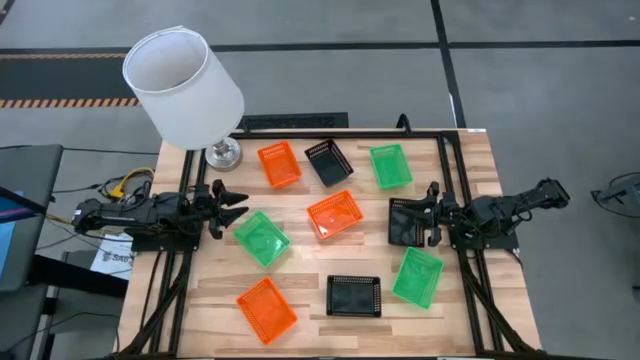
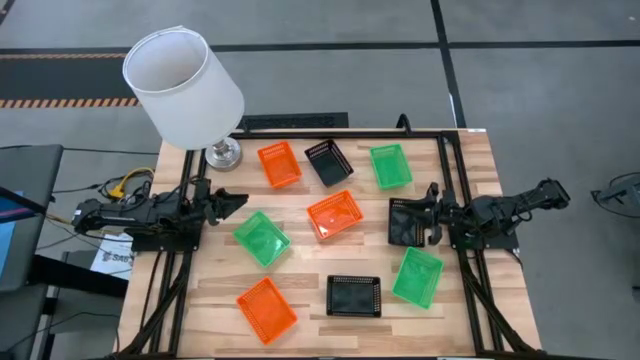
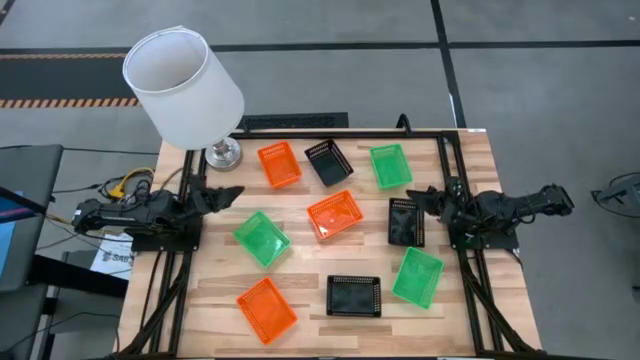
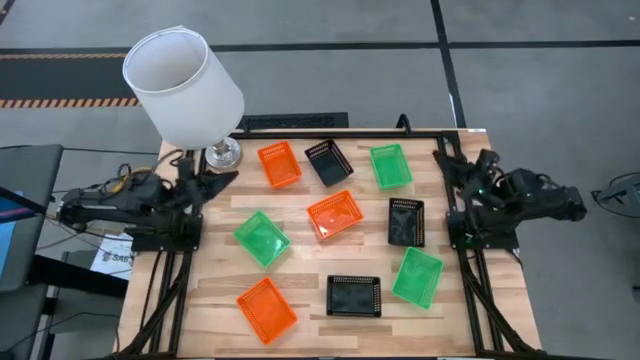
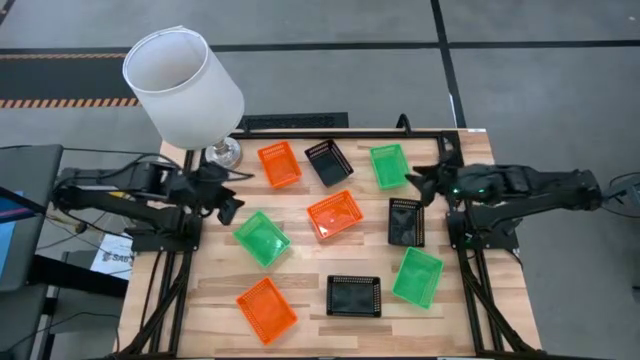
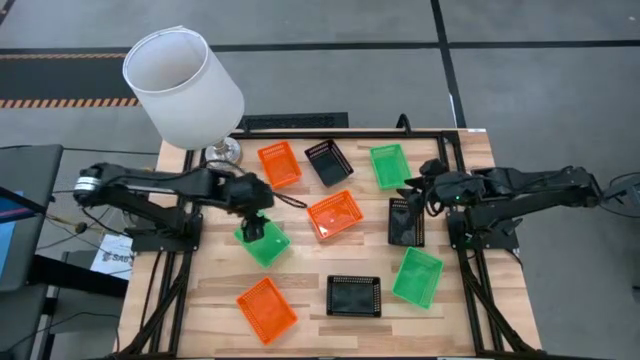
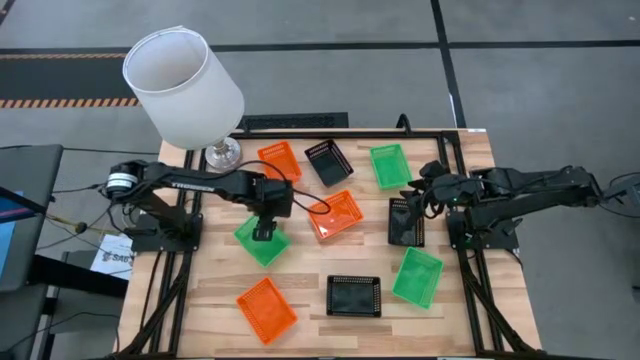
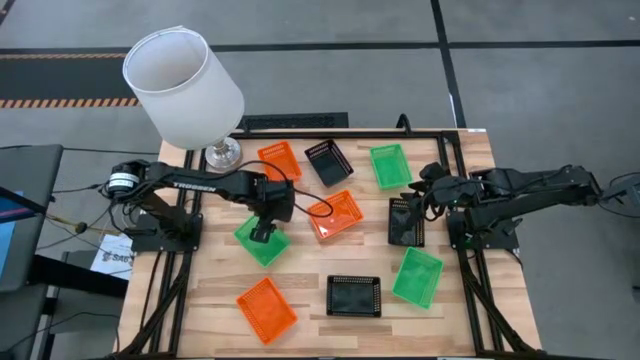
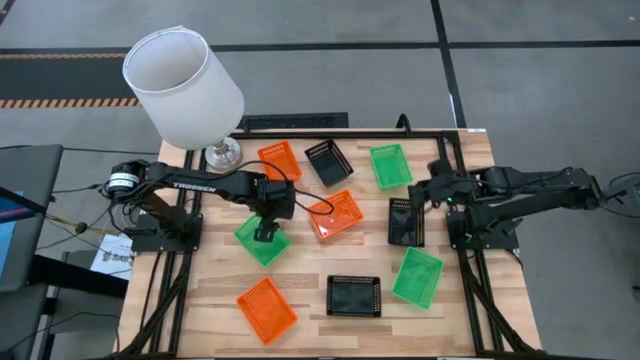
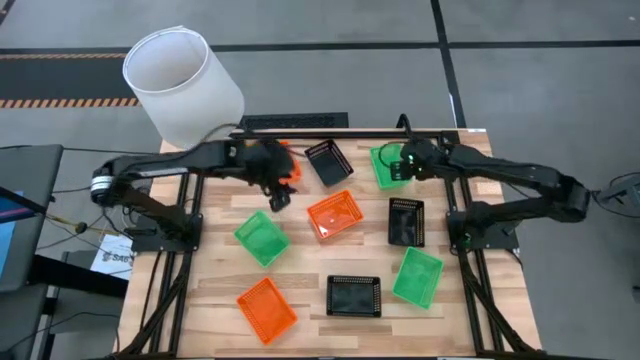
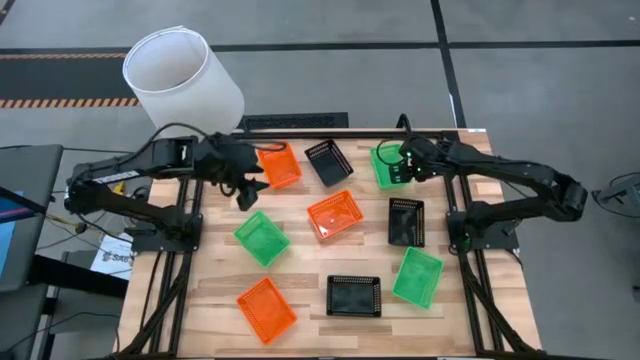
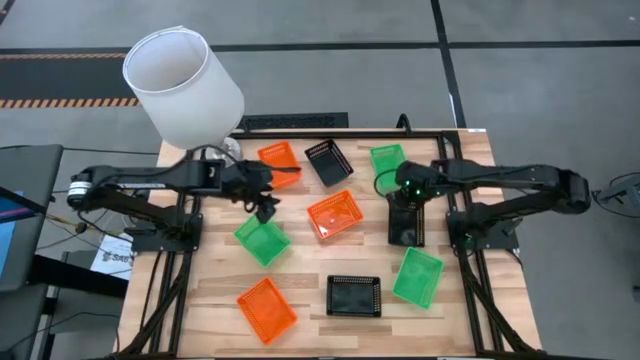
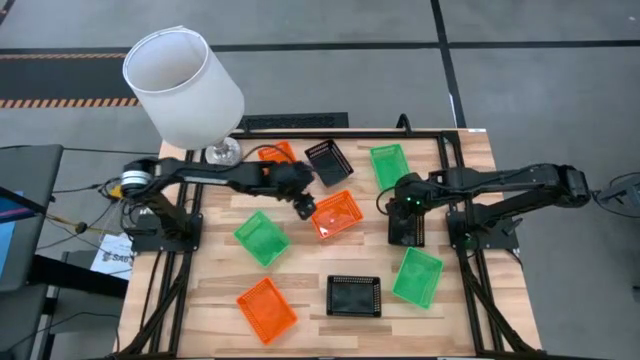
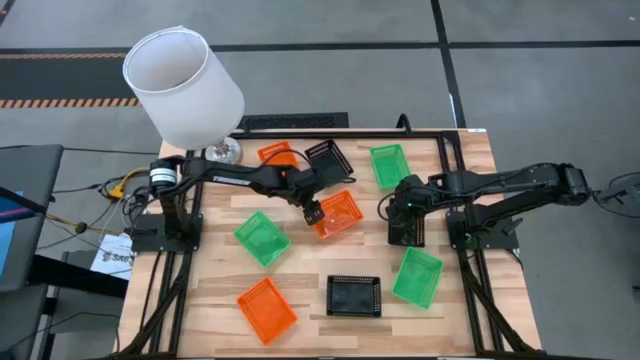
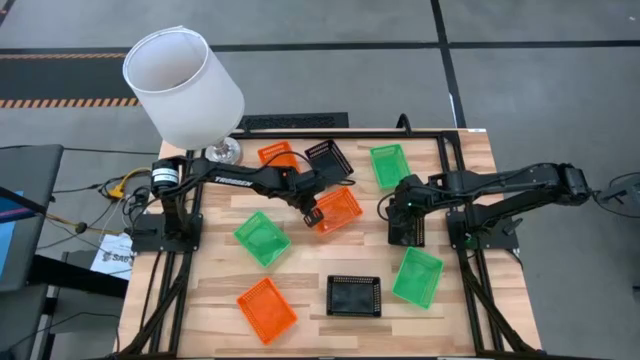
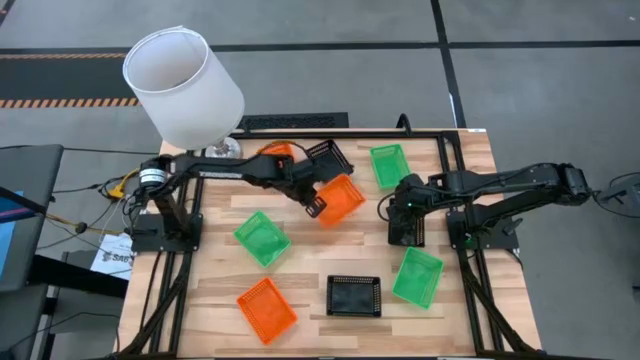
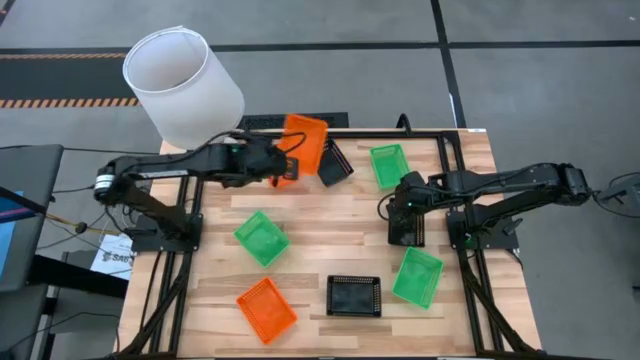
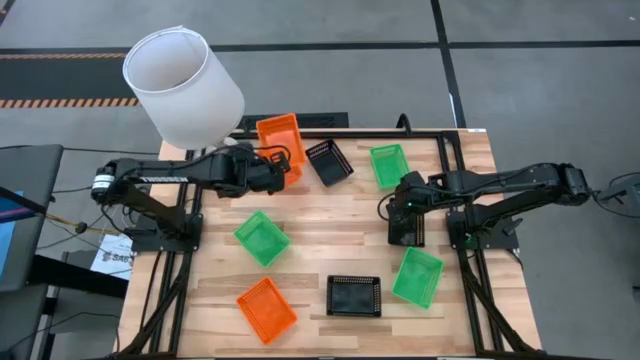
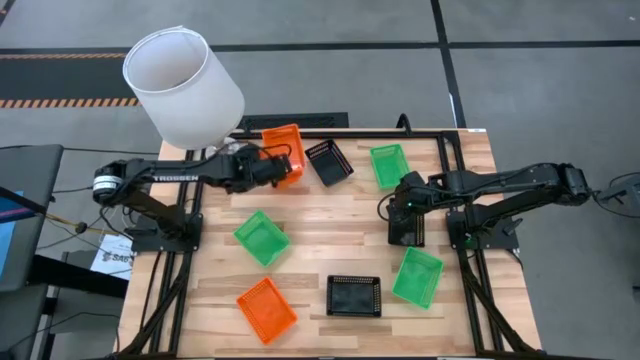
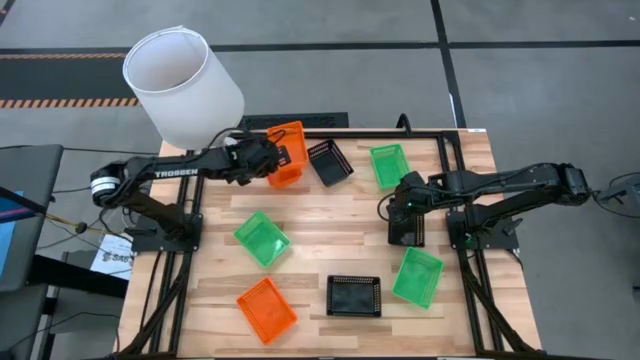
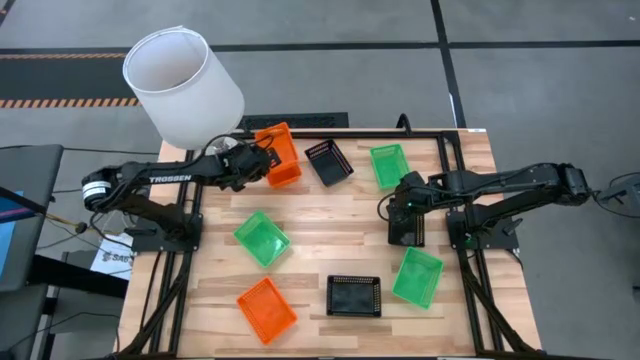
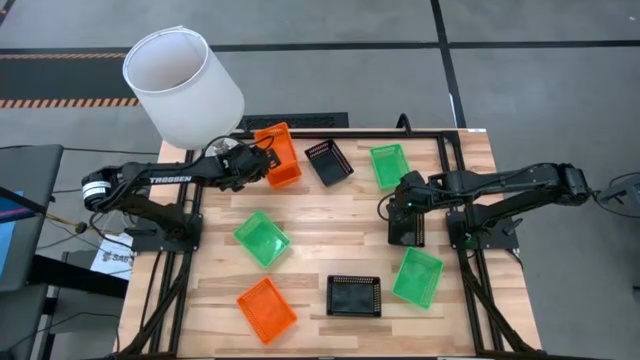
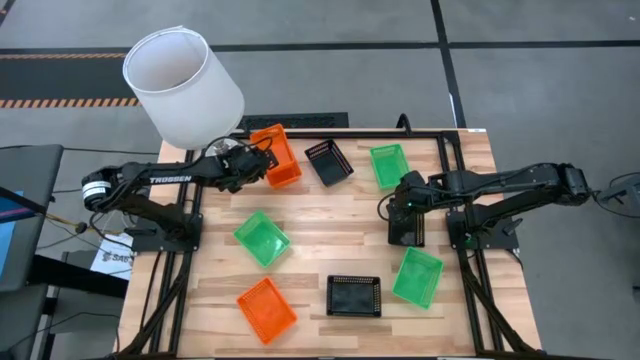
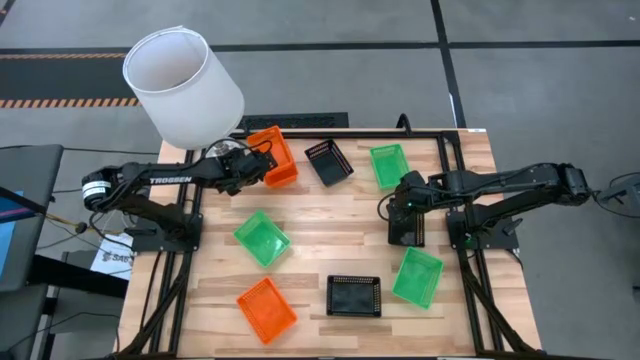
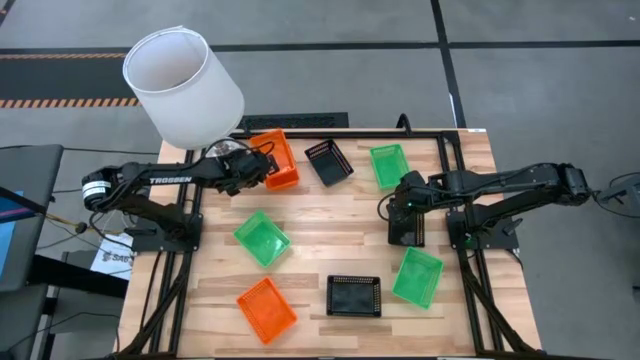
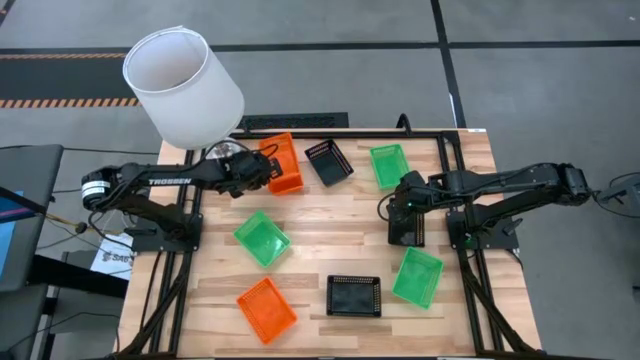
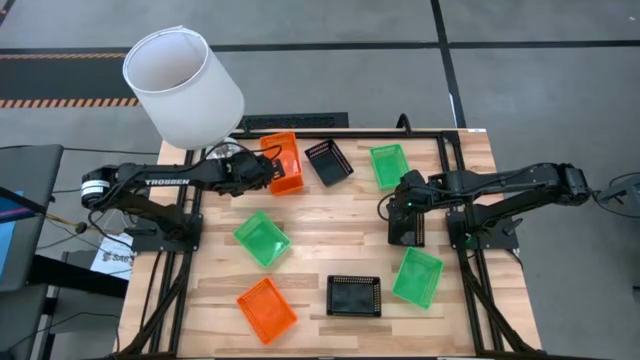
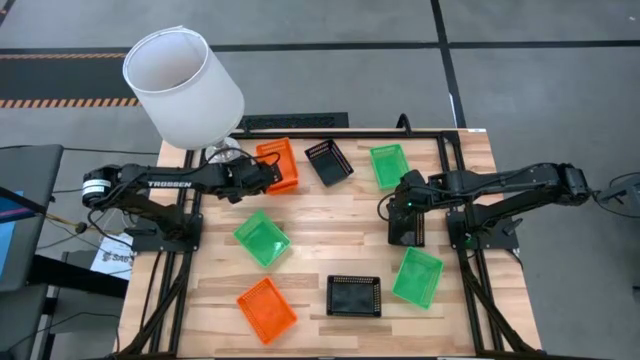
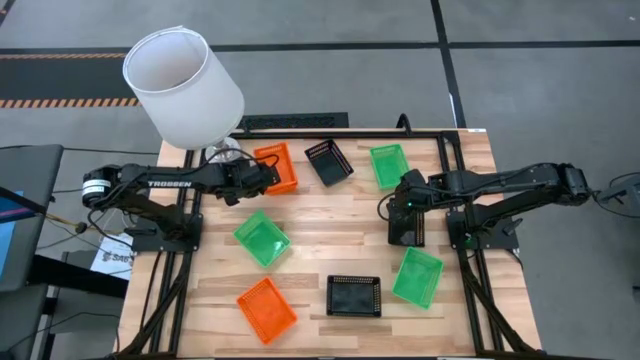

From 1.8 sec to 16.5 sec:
Stack the middle orange bin on top of the top orange bin

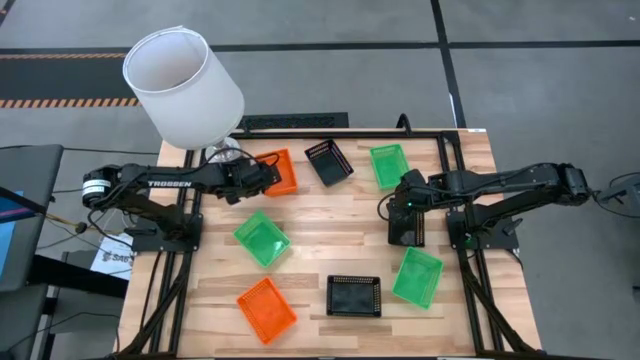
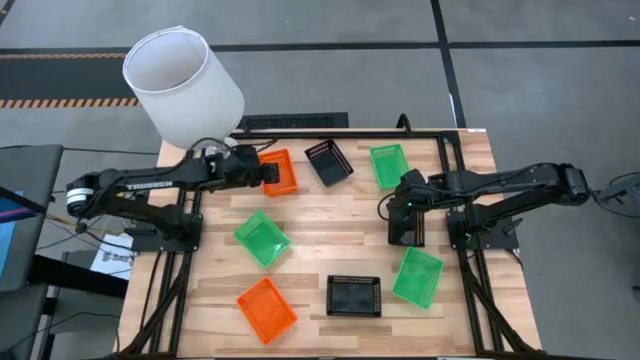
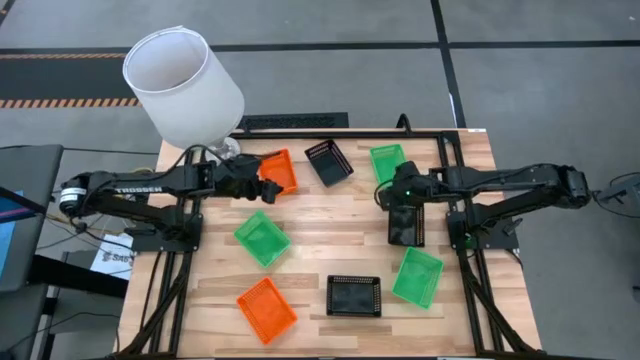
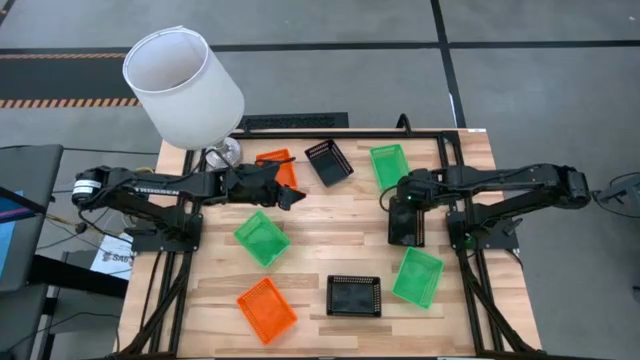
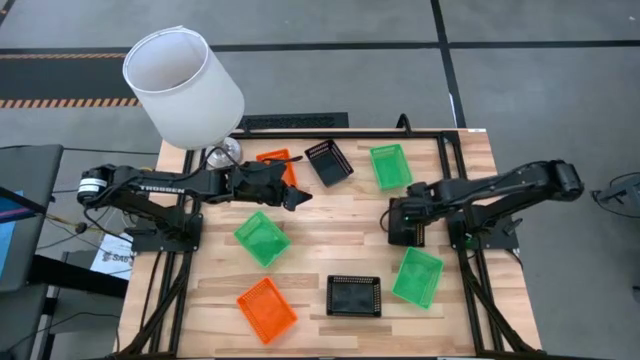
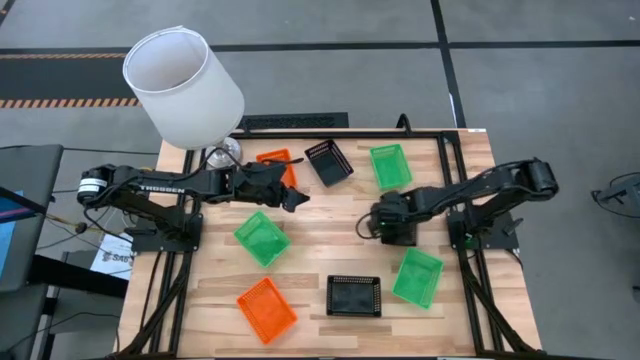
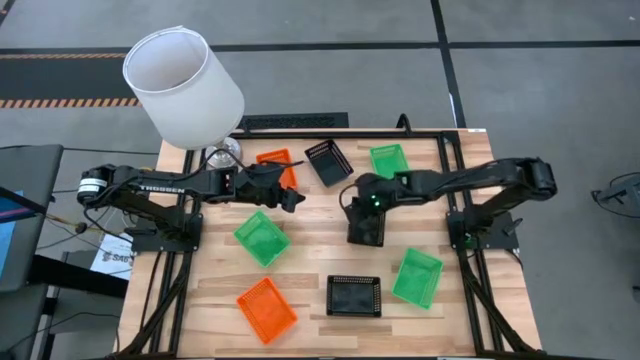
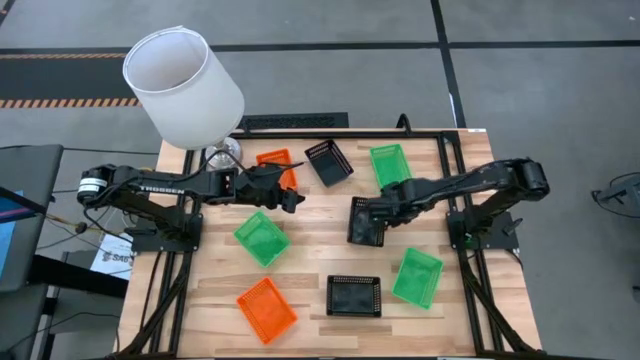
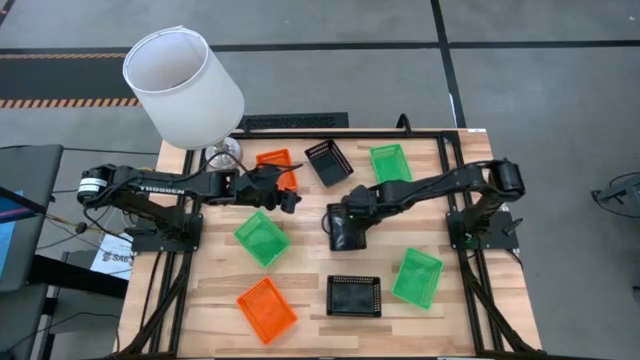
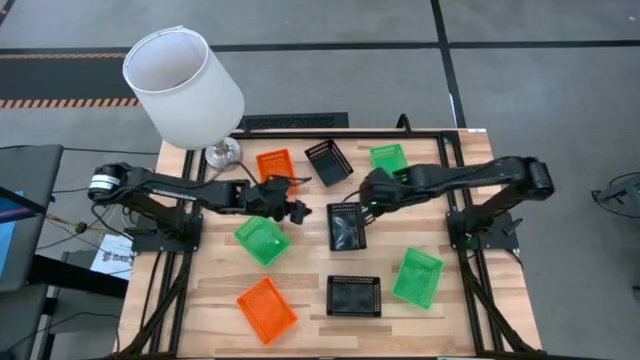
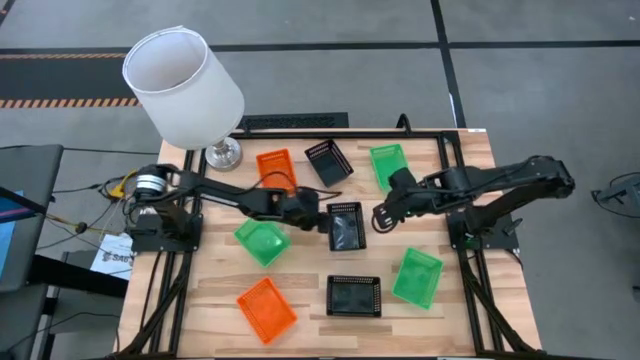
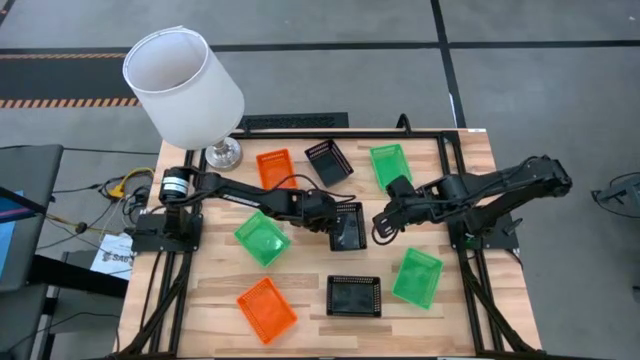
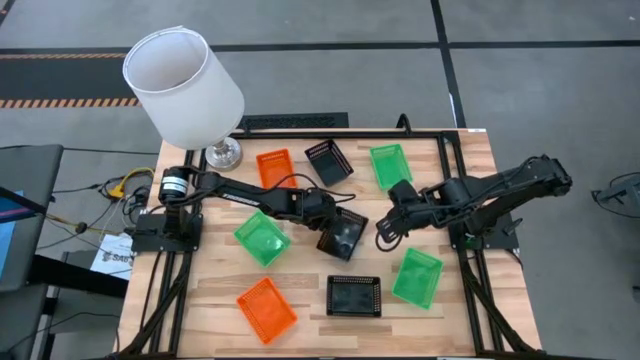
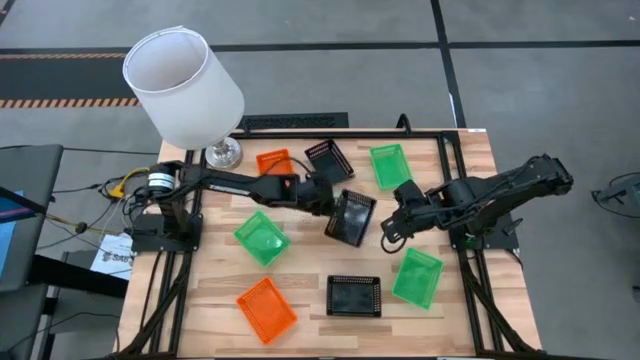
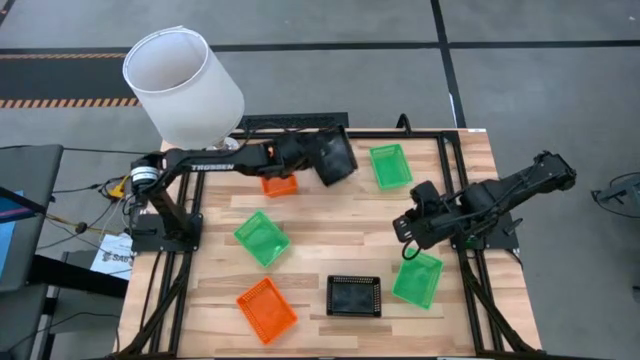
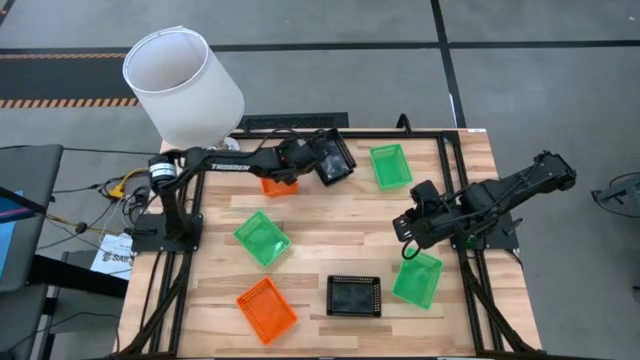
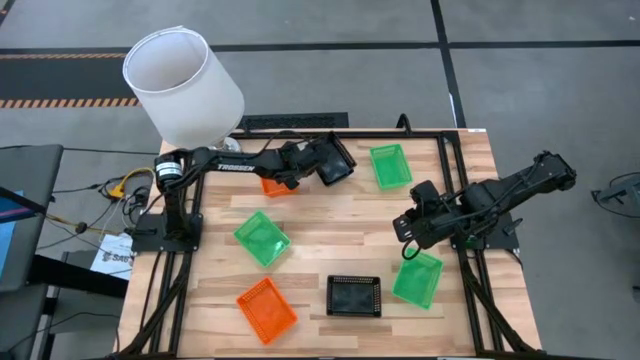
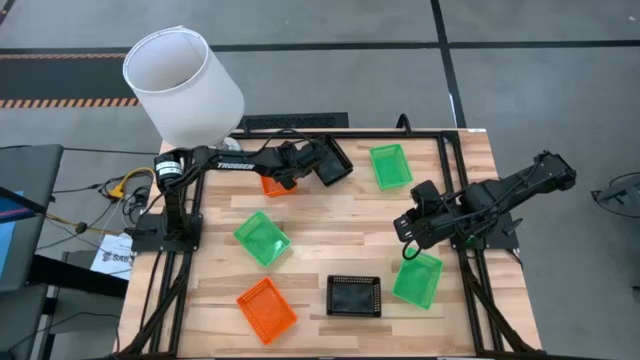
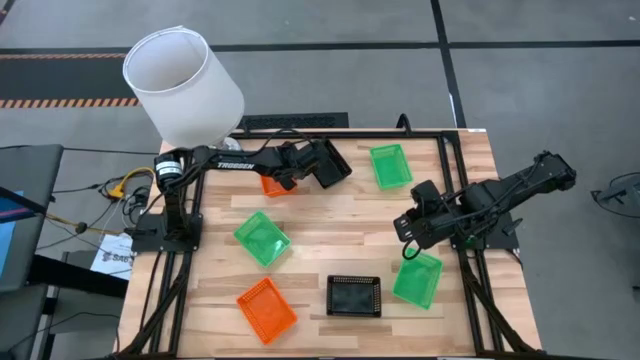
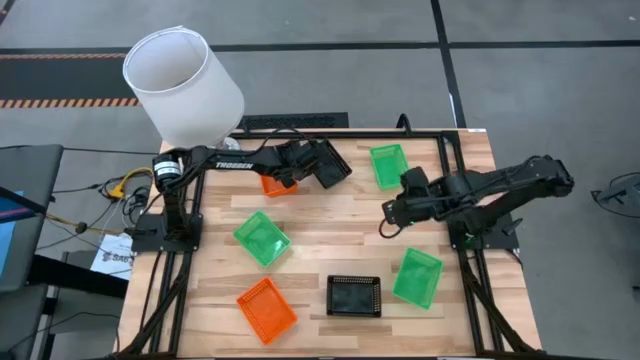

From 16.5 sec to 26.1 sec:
Stack the middle black bin on top of the top black bin
